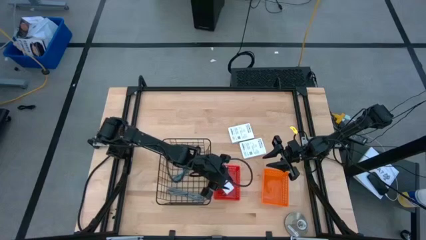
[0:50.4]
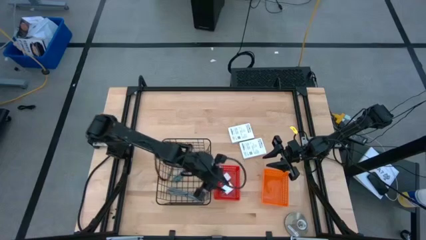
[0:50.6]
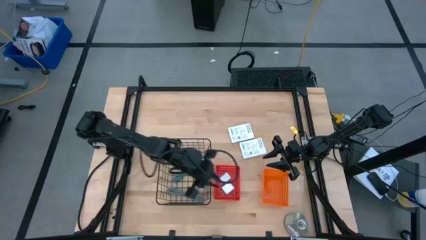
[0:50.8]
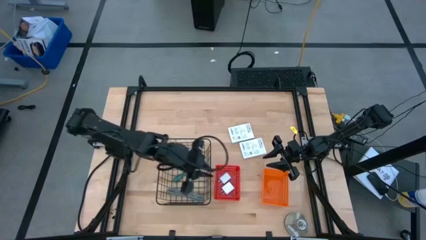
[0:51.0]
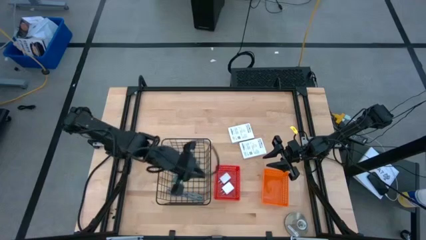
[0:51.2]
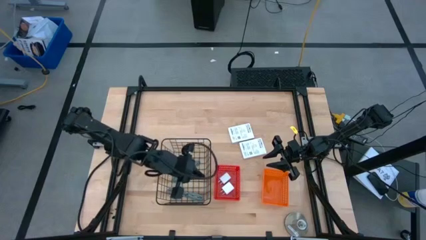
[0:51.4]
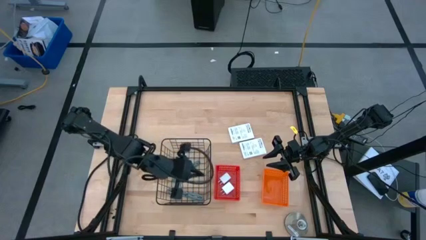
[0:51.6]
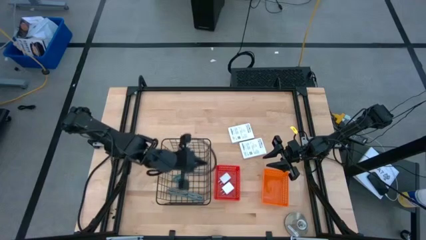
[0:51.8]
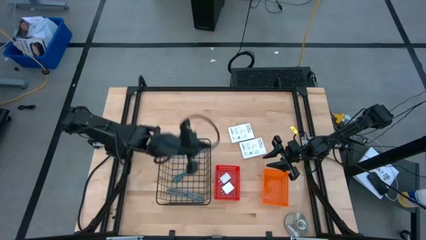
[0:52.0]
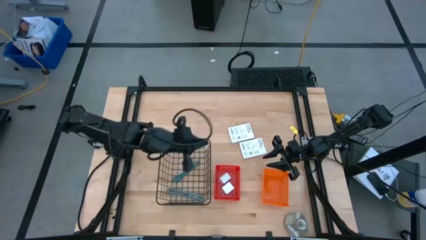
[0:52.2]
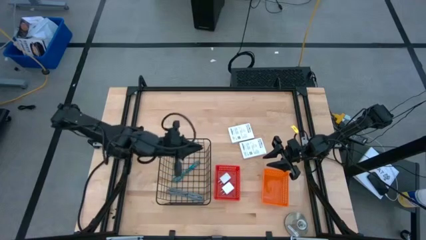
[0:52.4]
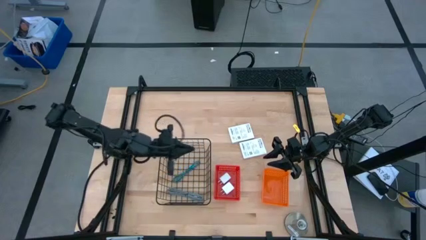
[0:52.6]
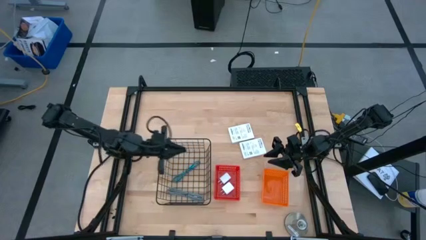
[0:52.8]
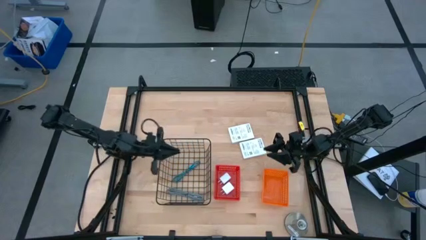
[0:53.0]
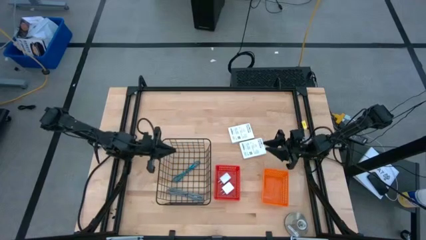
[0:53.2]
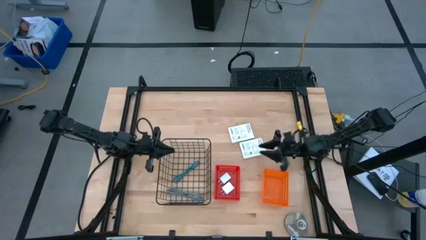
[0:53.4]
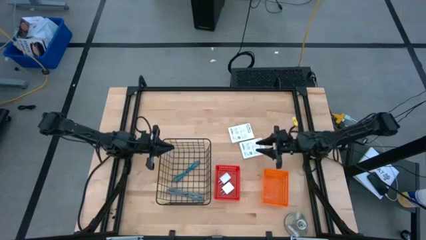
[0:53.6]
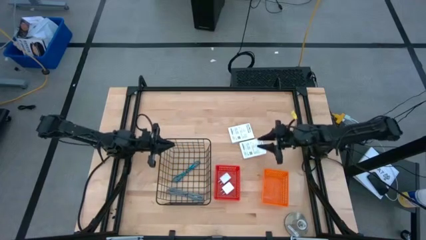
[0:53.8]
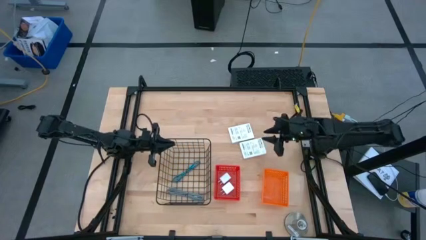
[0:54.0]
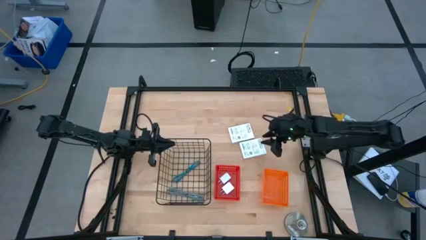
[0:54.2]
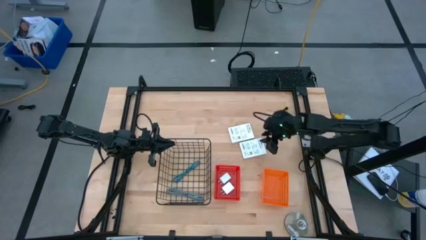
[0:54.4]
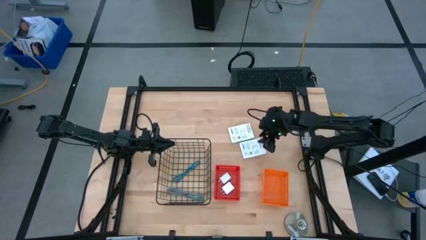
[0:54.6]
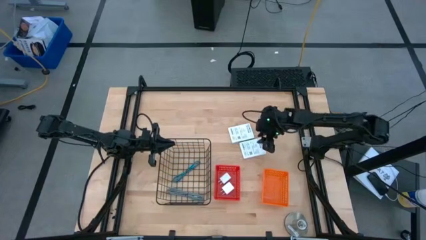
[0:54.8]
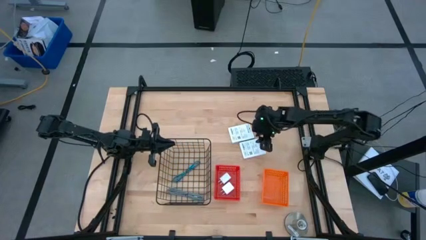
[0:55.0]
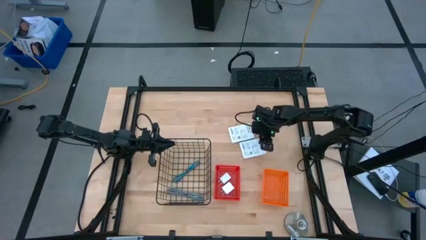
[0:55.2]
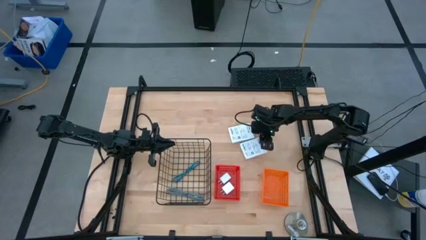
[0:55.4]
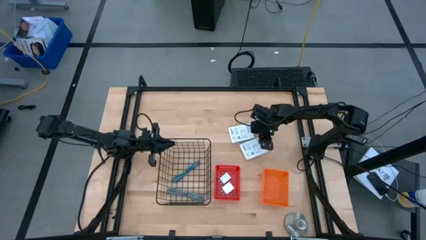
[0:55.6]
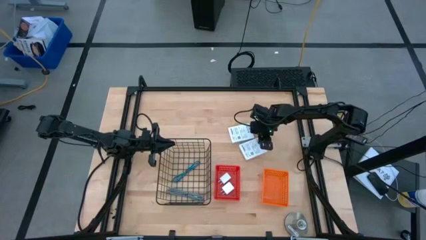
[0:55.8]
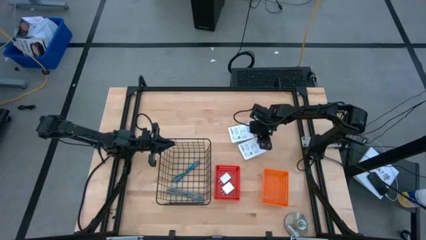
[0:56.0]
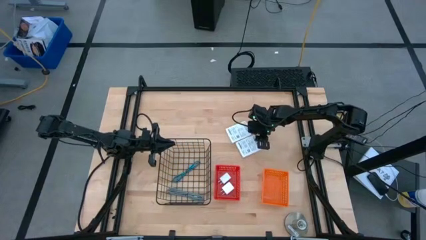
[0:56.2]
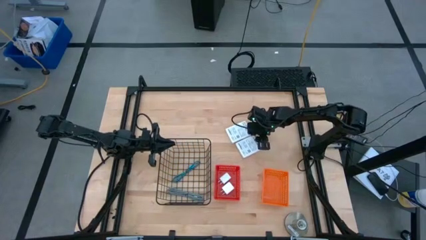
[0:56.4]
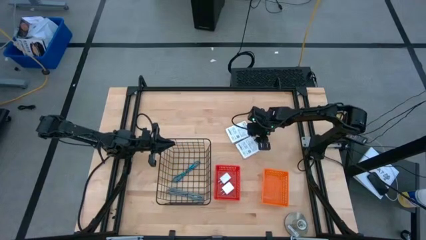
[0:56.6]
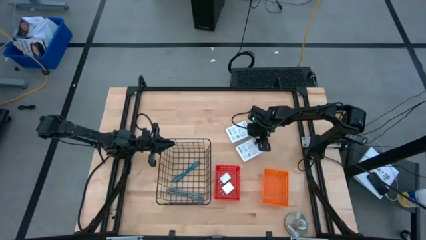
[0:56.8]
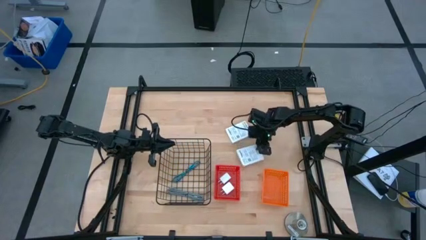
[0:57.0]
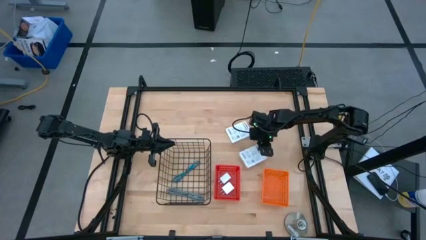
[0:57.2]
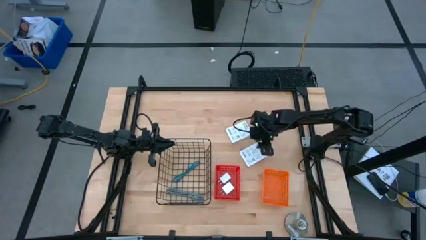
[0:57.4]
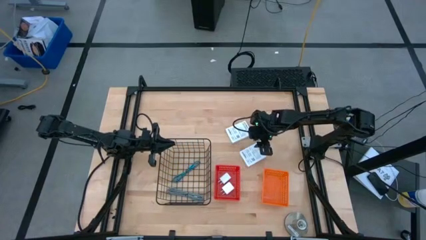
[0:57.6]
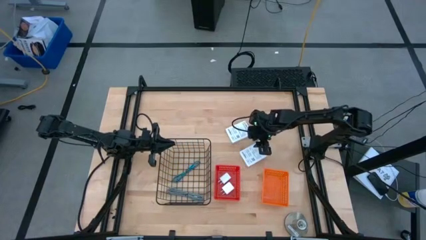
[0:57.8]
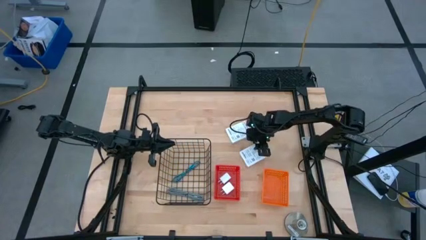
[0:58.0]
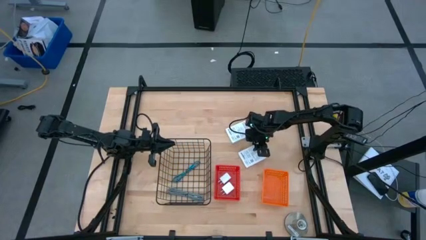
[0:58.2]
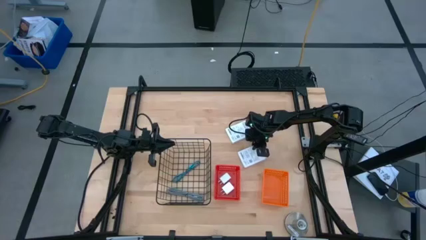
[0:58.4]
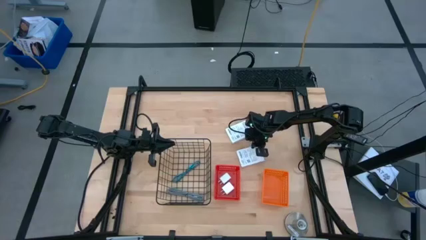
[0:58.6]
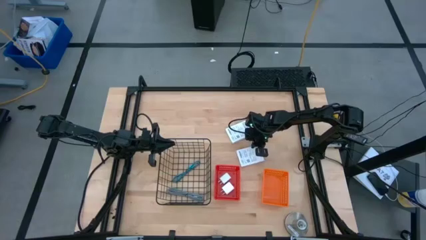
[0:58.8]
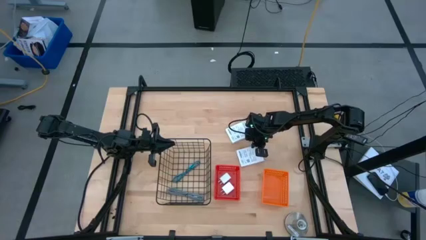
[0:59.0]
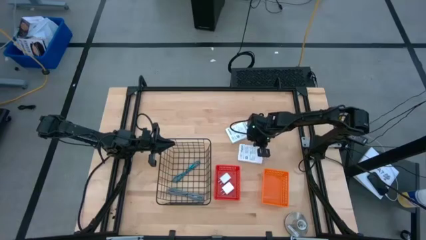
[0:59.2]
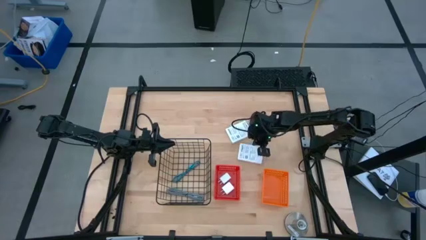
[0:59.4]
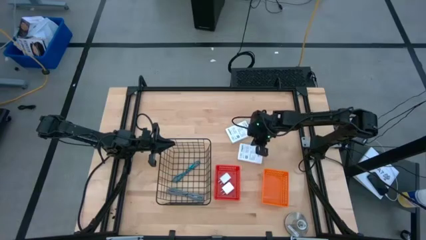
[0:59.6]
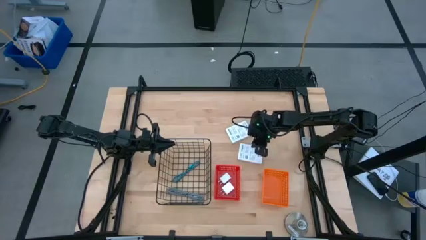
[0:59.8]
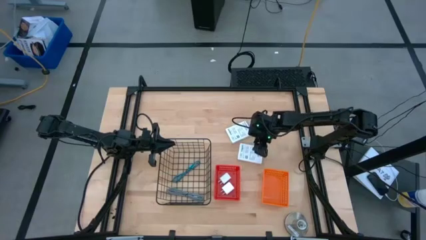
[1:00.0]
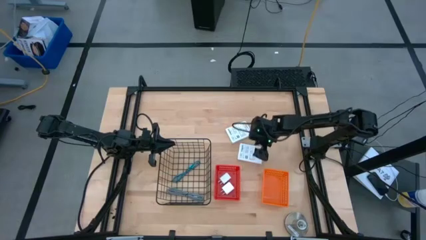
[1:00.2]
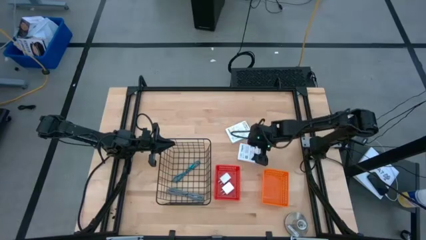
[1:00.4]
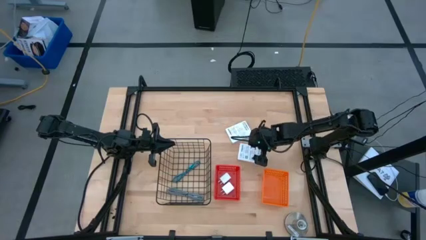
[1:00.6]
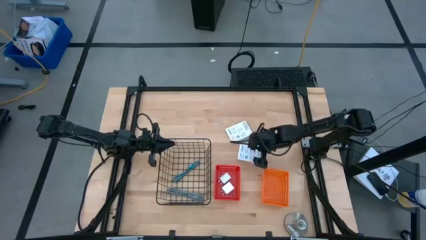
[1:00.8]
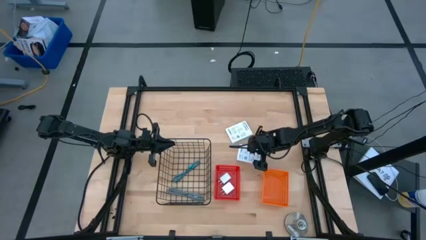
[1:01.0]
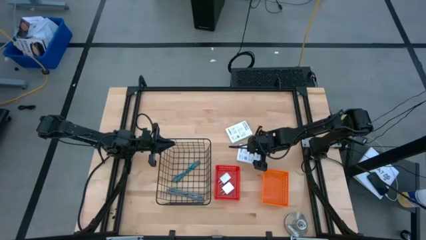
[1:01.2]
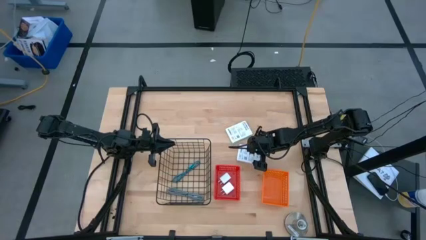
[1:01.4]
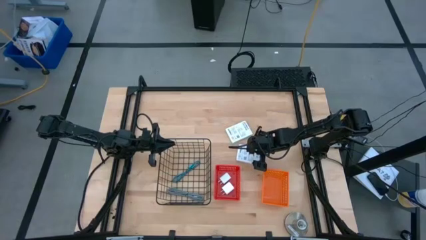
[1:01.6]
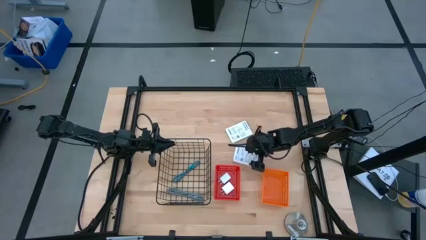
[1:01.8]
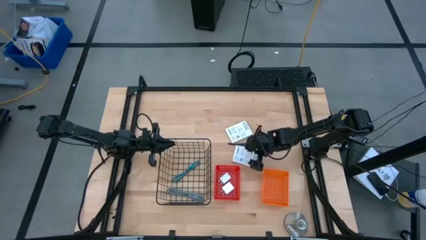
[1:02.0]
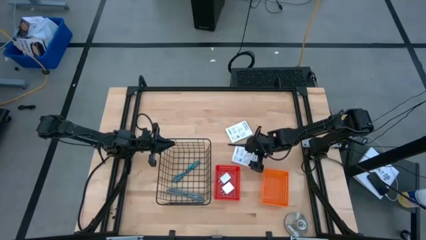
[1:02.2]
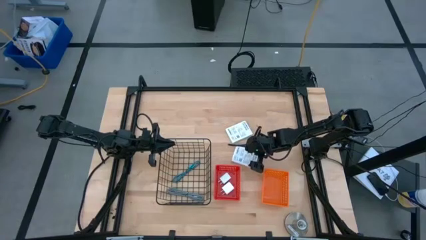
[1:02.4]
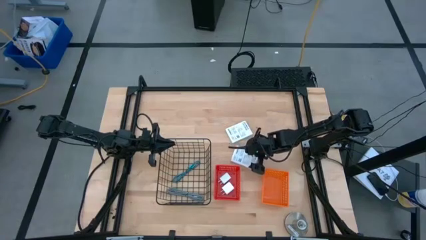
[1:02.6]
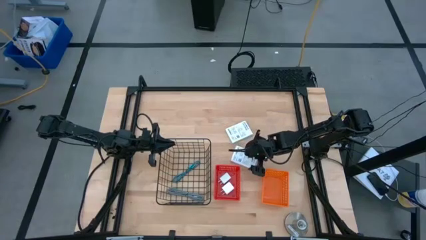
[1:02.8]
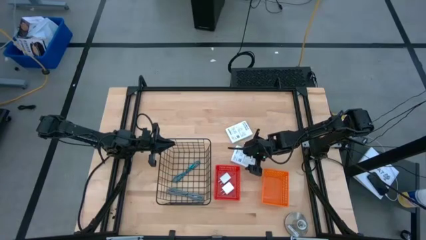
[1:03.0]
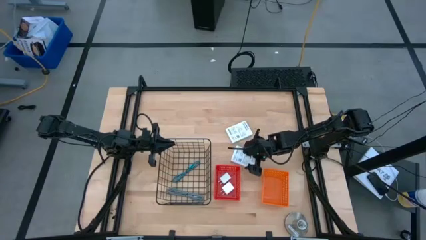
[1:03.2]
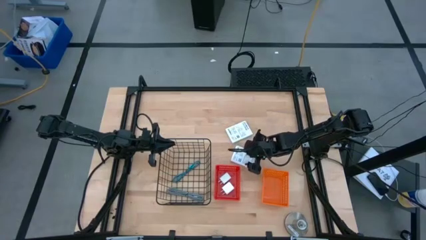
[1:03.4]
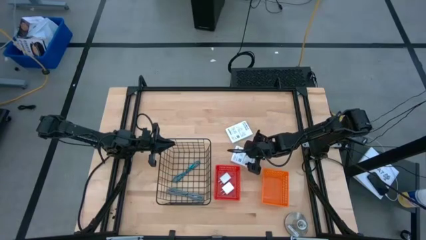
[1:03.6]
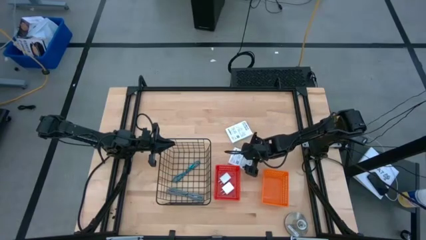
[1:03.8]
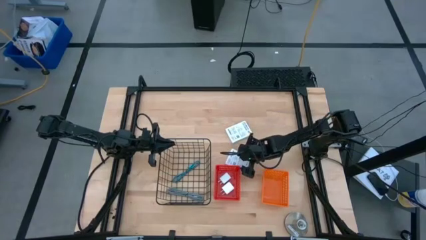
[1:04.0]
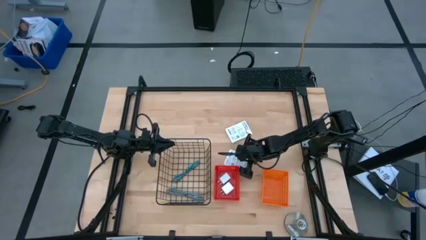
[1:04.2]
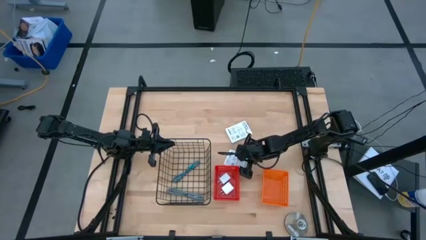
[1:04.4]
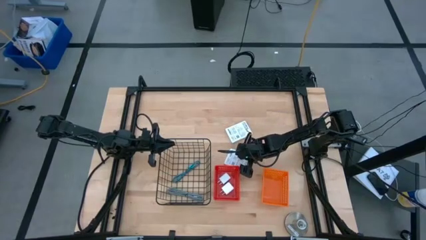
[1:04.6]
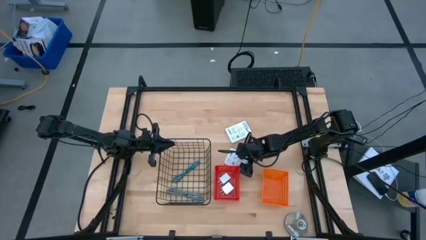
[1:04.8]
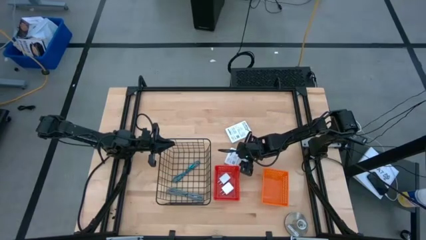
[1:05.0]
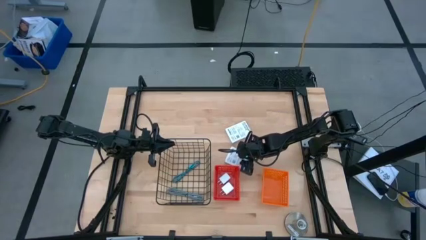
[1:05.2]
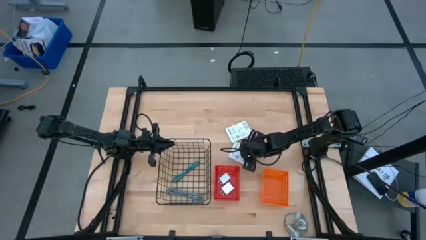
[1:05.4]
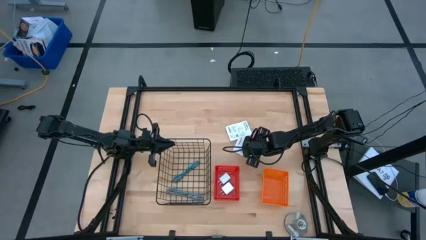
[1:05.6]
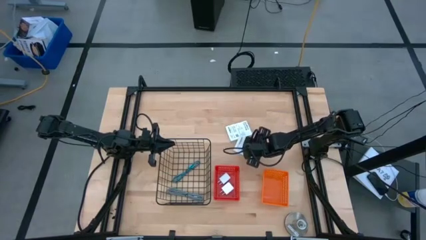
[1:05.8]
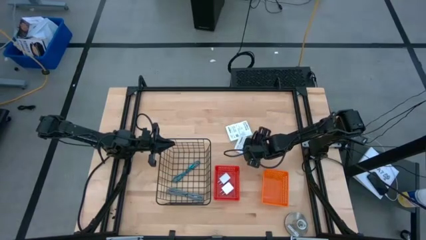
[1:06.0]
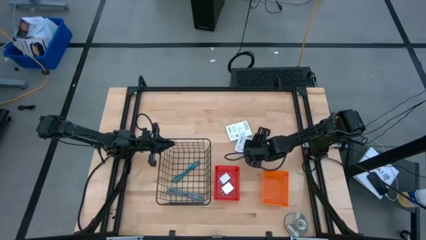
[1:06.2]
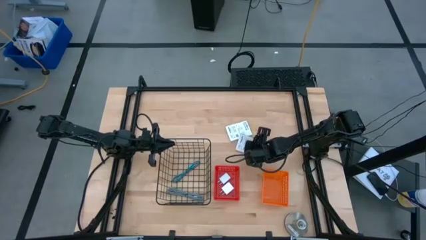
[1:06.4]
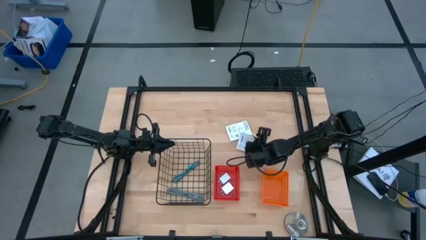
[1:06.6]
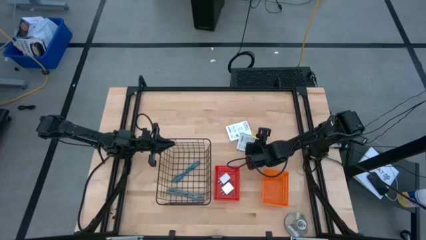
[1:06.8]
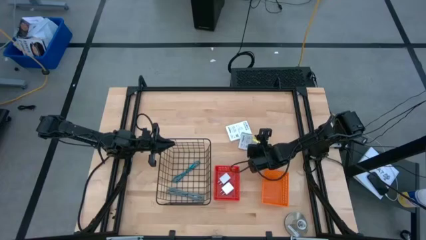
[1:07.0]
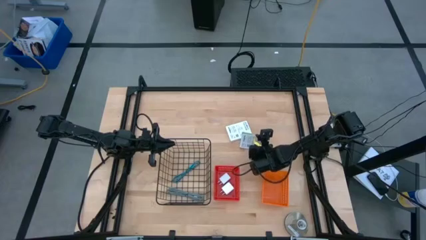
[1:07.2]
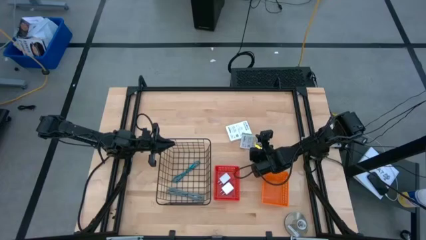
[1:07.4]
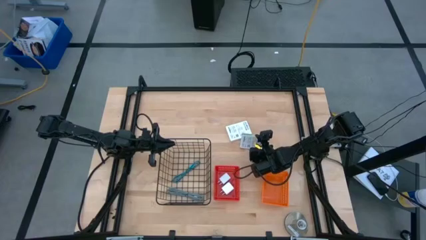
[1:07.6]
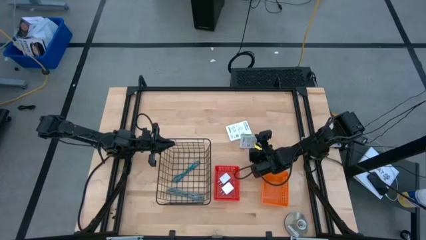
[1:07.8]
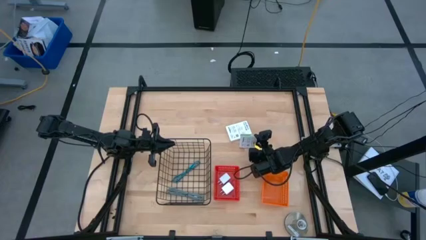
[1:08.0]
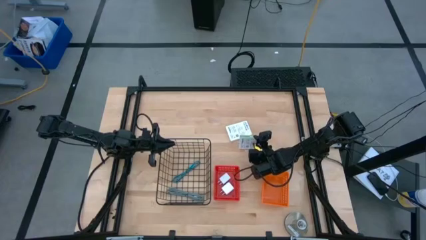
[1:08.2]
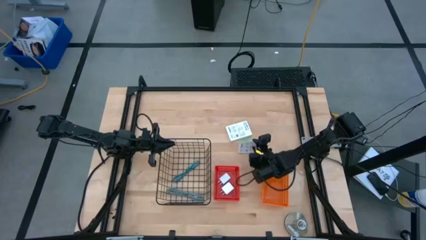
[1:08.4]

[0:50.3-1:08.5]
Task: Pick and place items into bin
Put the top card reader box into the orange basket
